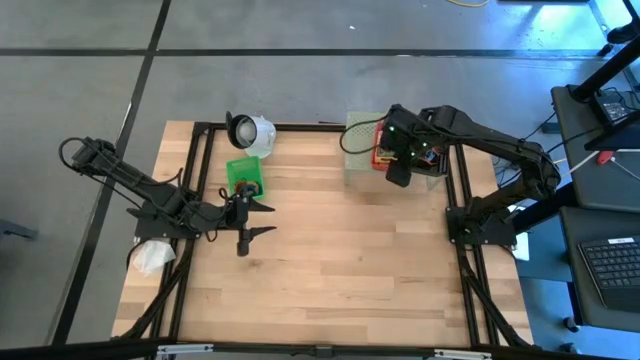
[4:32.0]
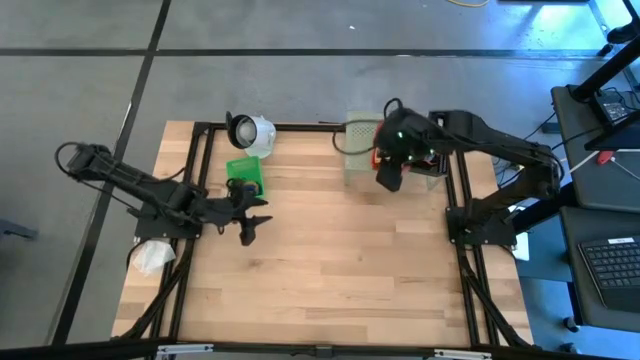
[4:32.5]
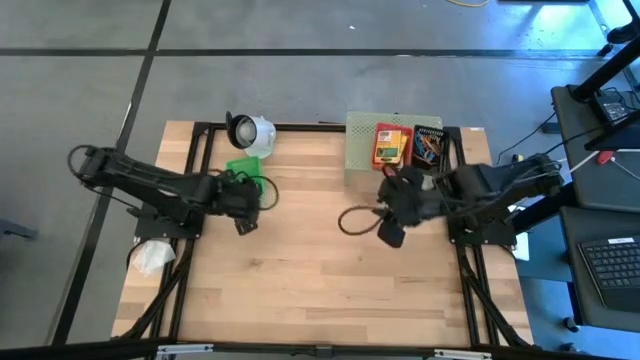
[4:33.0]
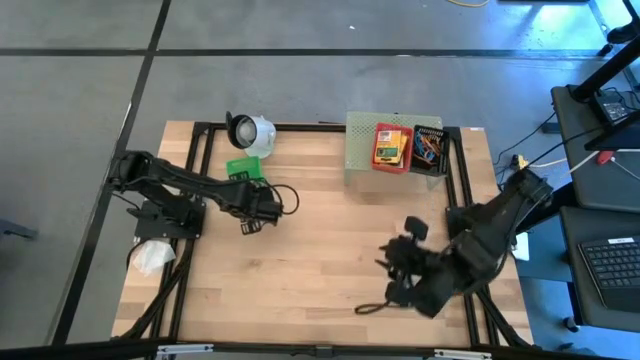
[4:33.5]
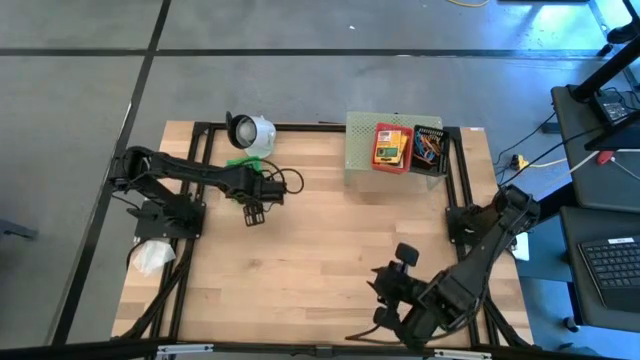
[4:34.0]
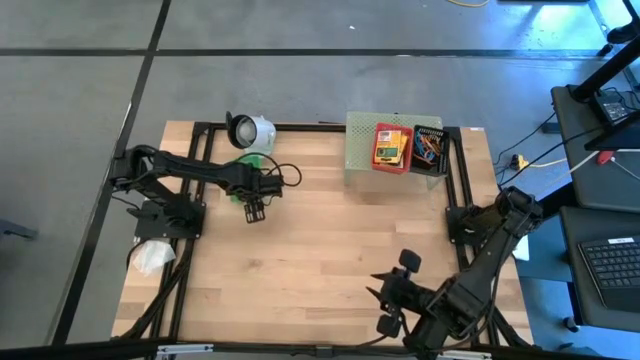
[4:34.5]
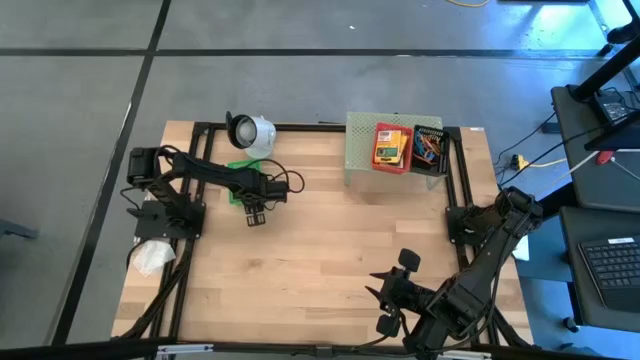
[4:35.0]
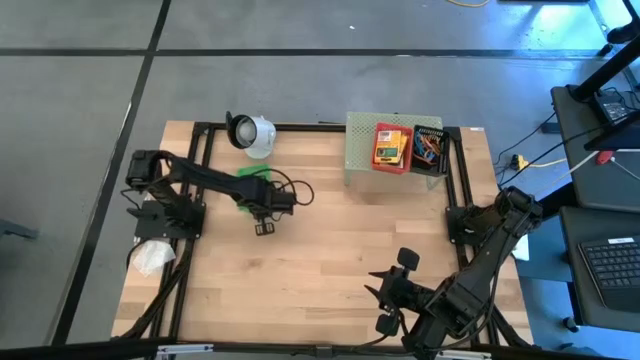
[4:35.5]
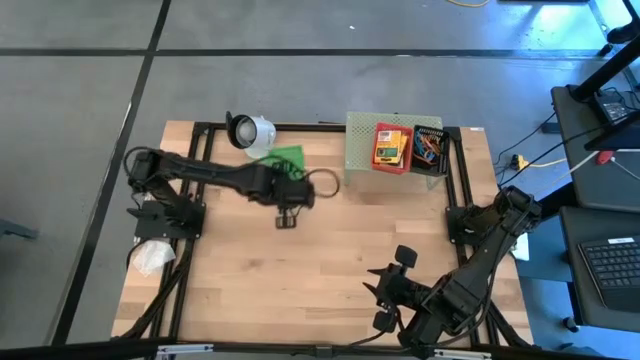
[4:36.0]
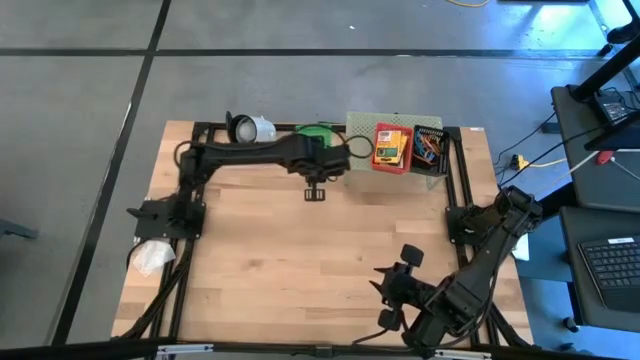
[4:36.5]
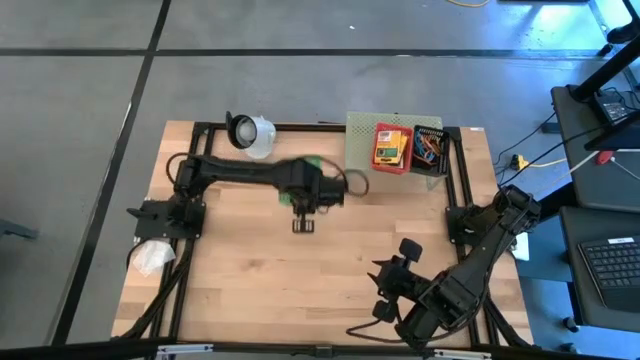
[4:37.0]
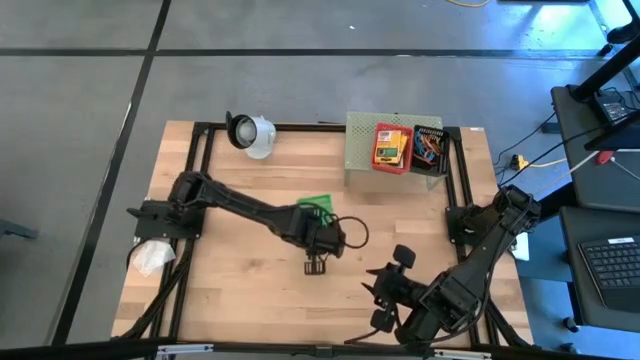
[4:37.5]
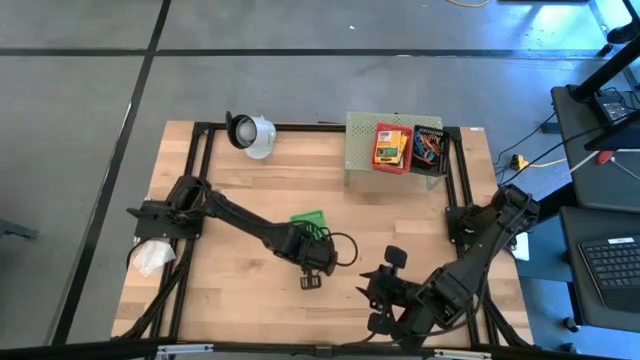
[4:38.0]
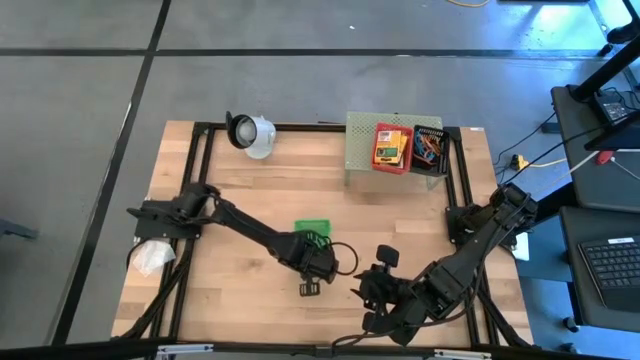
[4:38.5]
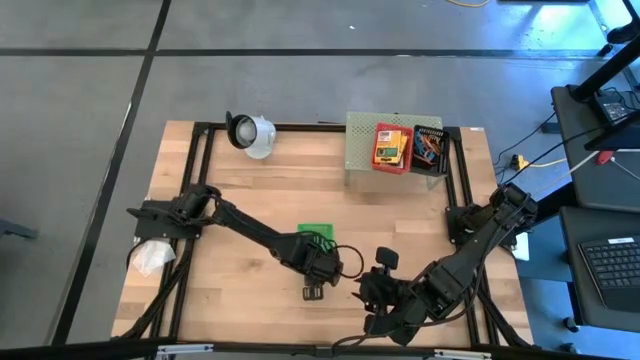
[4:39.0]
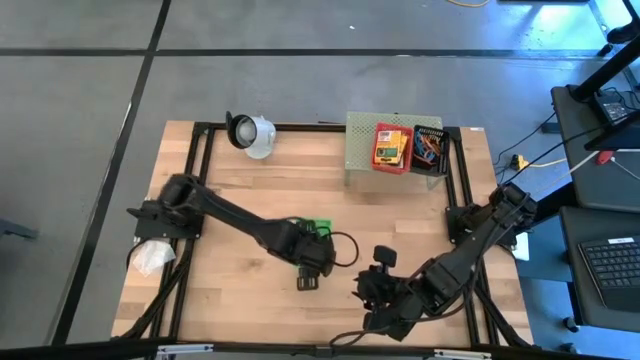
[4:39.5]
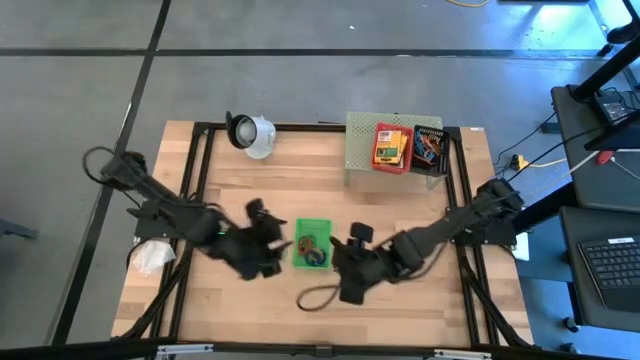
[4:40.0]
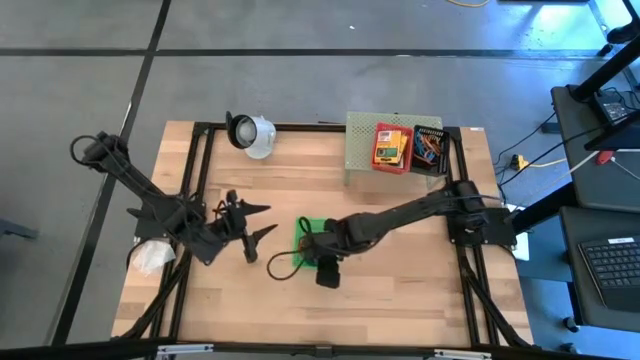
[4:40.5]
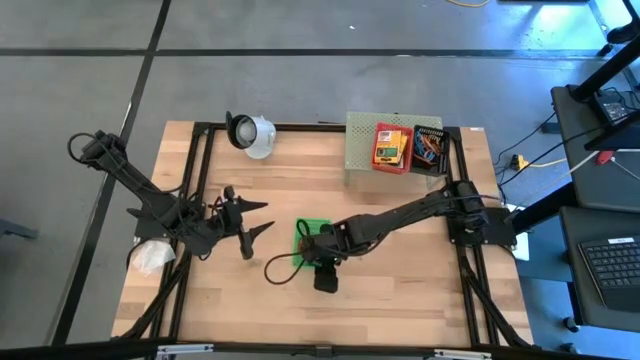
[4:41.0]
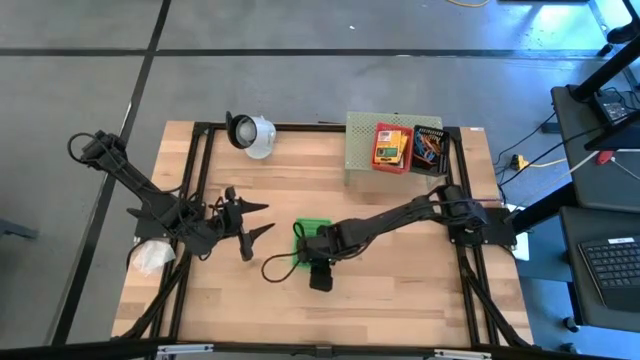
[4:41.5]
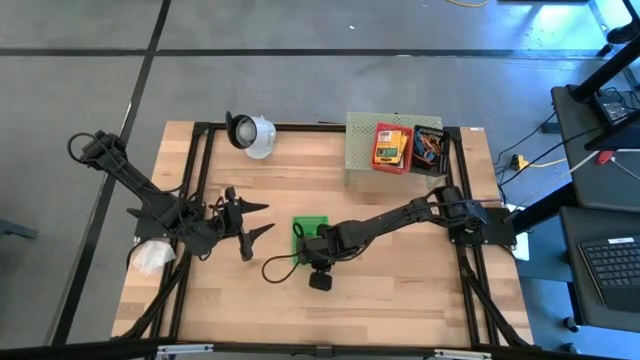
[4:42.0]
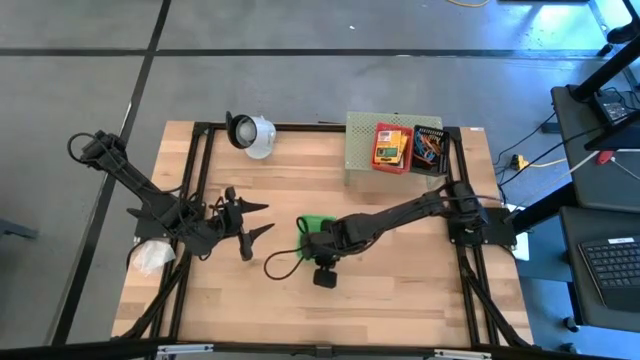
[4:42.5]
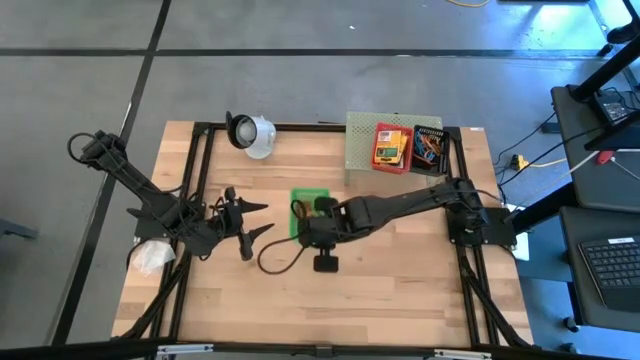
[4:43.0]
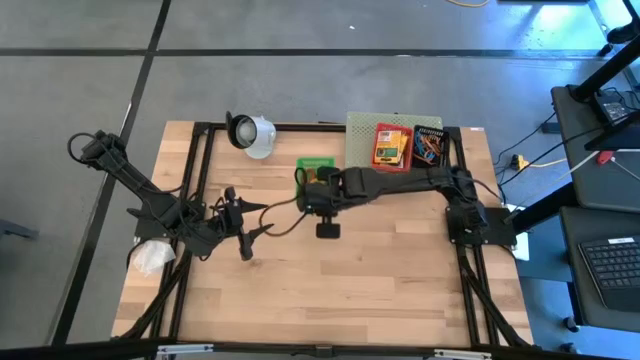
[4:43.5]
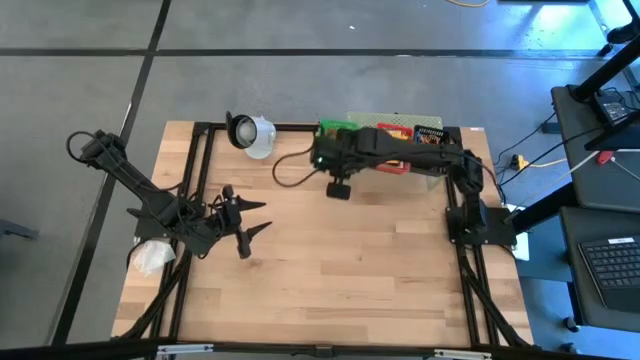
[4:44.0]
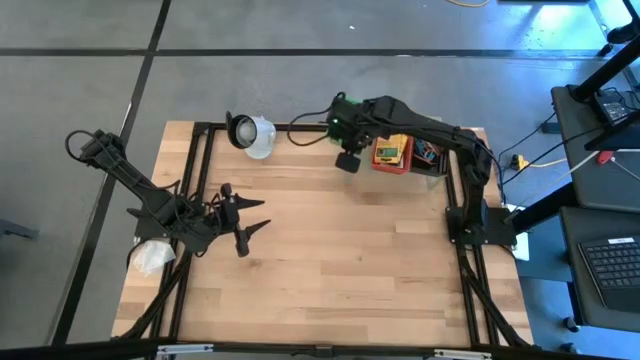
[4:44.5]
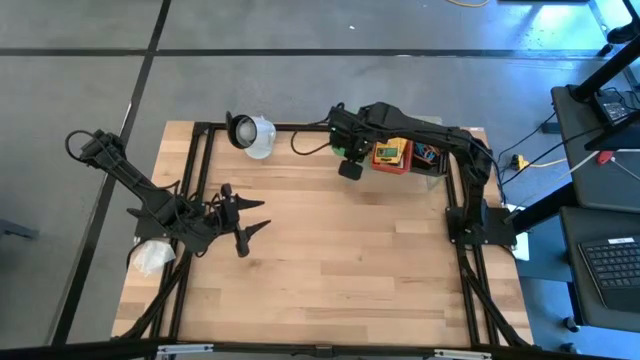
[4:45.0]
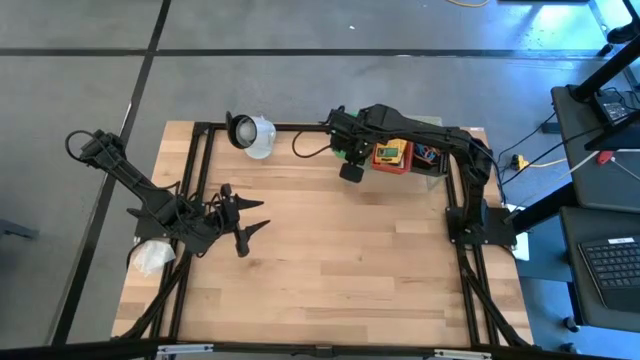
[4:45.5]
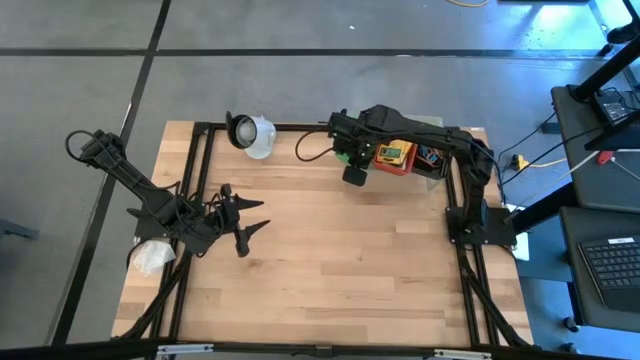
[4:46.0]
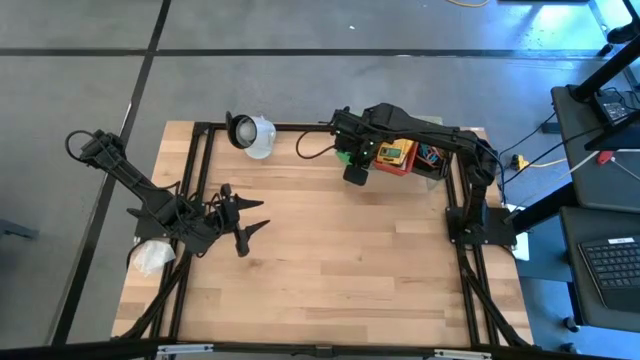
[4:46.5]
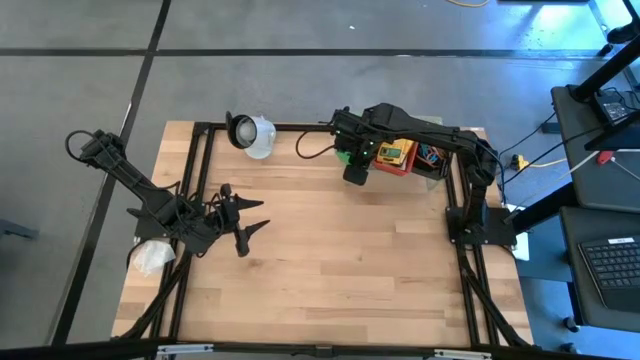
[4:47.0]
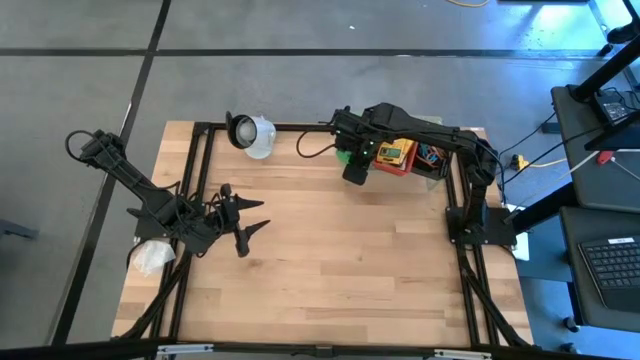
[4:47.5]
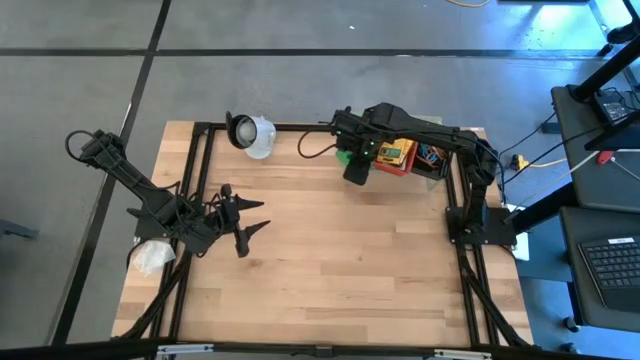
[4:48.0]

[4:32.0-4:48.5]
Task: Pick & Place Office Desk Supplies
Put the green basket on the shelf

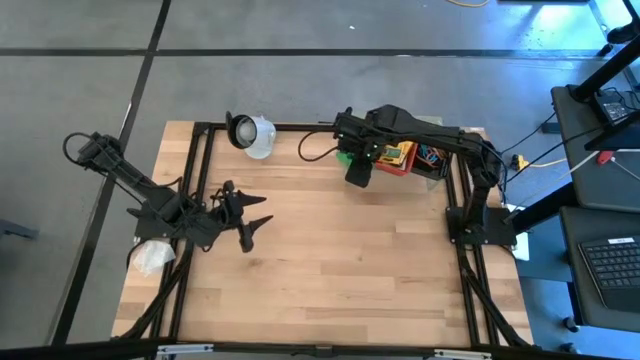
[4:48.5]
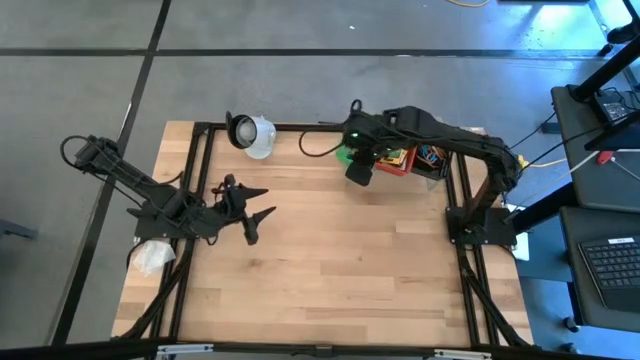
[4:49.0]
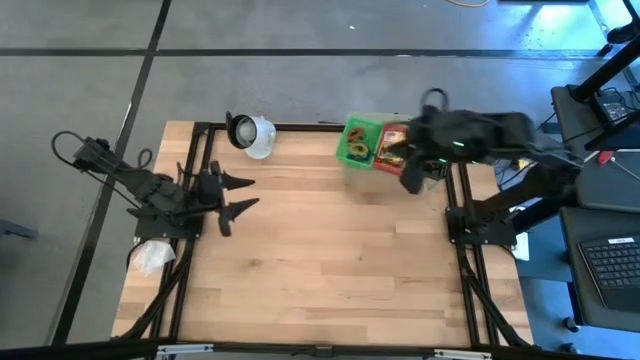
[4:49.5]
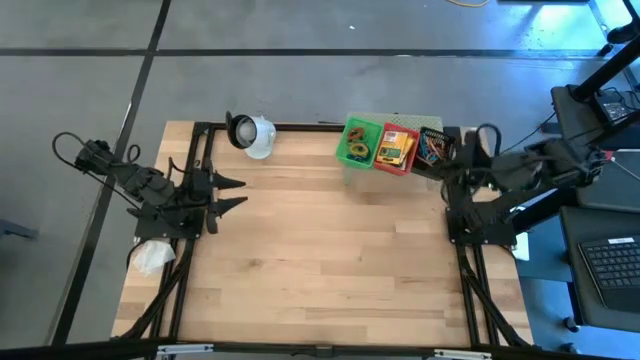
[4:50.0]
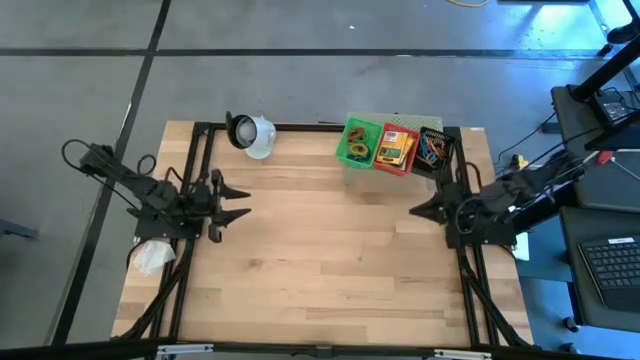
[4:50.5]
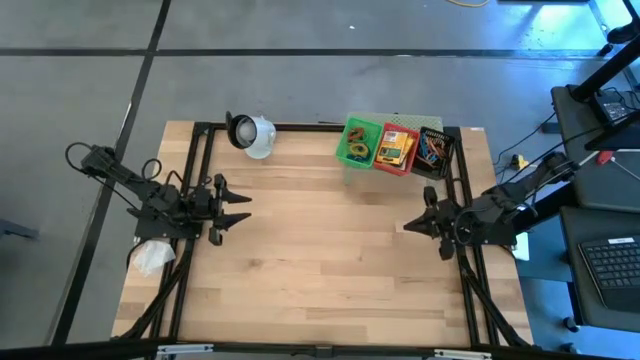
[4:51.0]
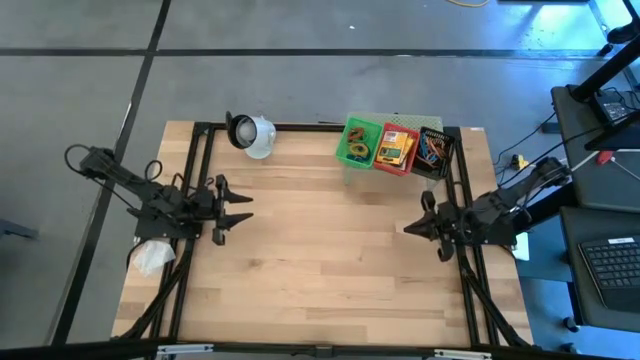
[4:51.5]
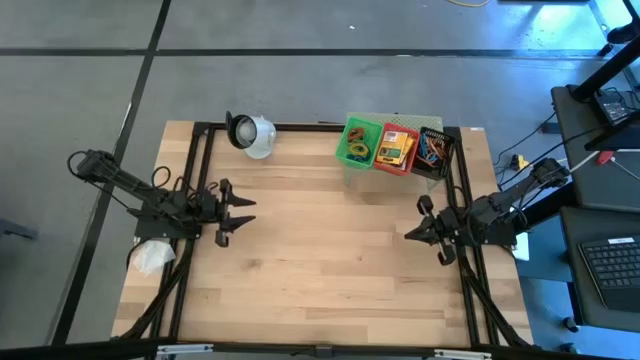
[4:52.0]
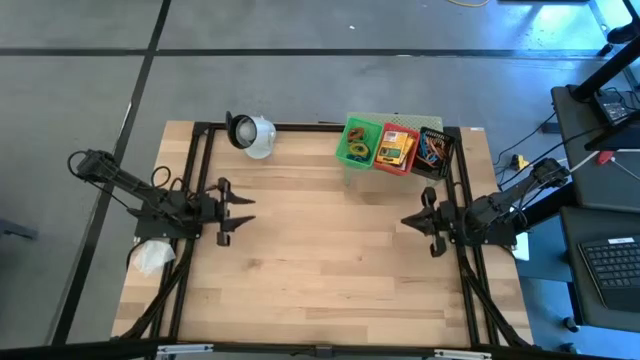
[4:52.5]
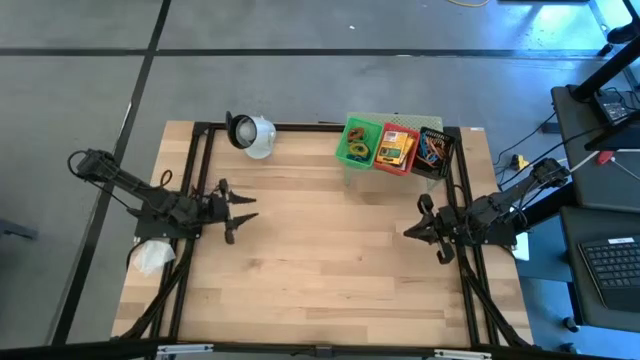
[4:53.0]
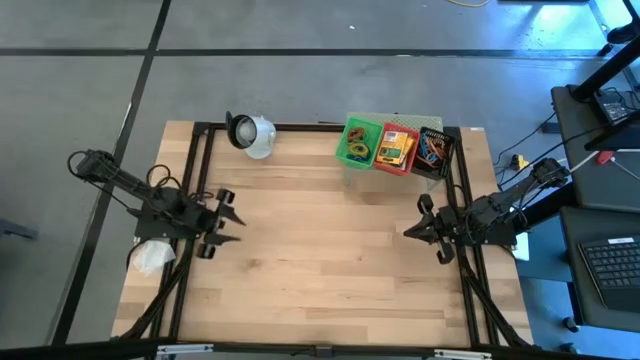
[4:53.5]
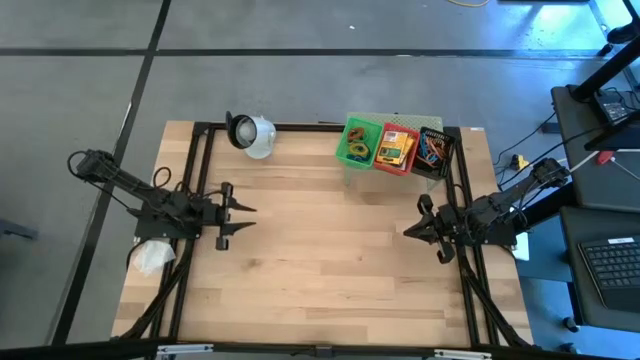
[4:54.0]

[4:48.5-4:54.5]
Return to Home Position
